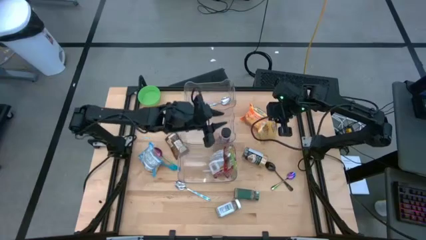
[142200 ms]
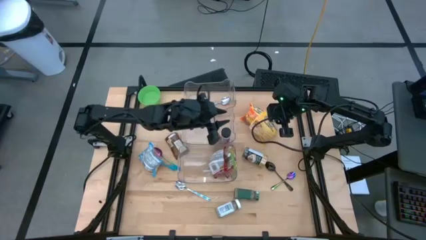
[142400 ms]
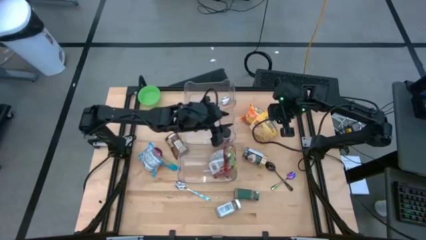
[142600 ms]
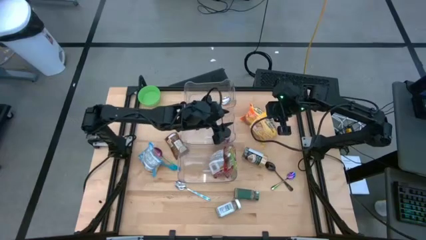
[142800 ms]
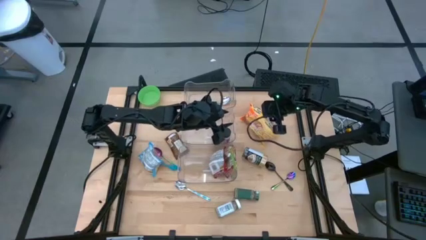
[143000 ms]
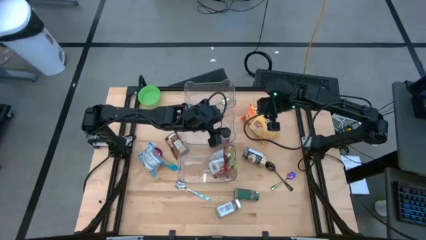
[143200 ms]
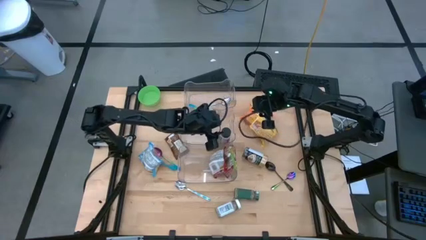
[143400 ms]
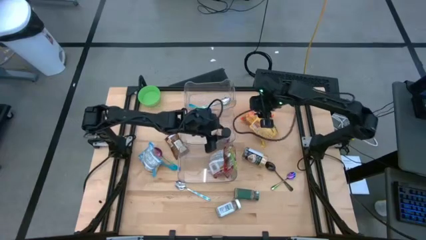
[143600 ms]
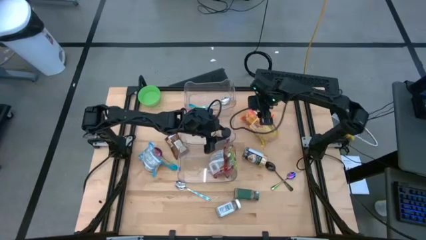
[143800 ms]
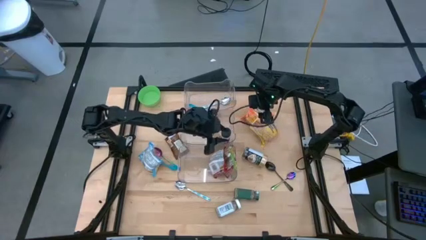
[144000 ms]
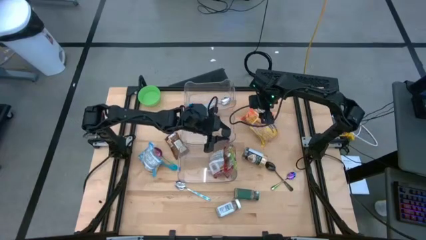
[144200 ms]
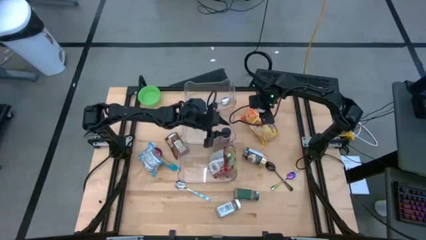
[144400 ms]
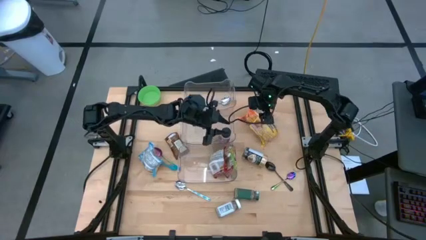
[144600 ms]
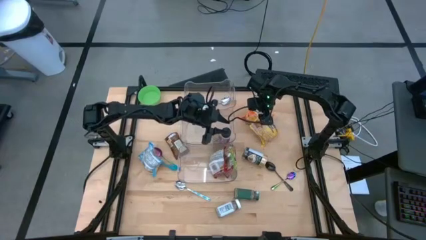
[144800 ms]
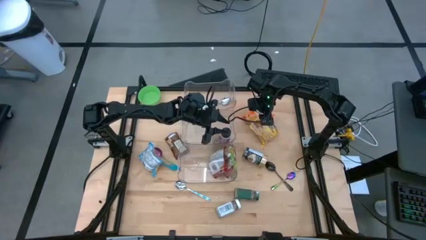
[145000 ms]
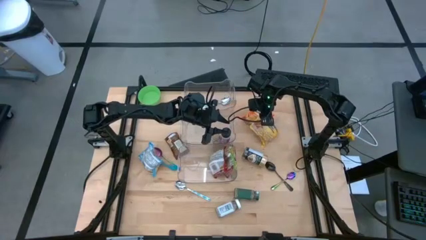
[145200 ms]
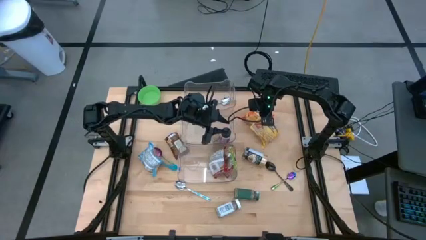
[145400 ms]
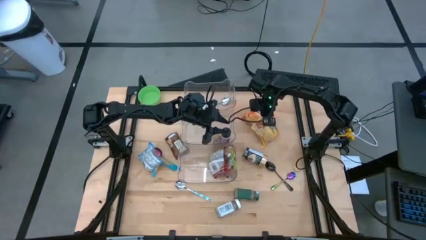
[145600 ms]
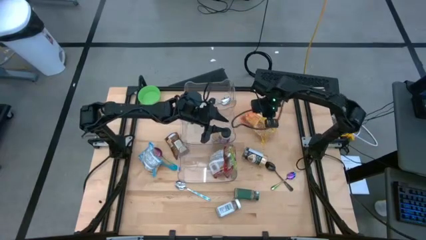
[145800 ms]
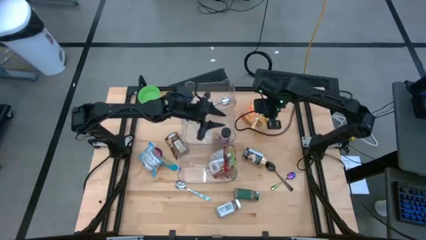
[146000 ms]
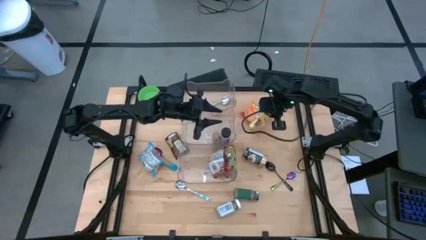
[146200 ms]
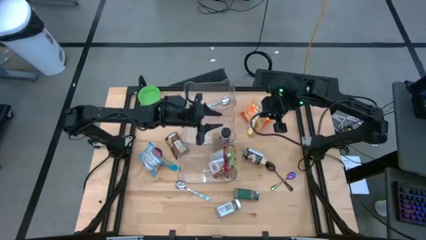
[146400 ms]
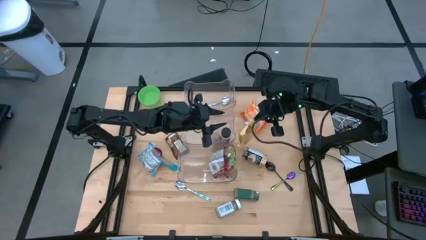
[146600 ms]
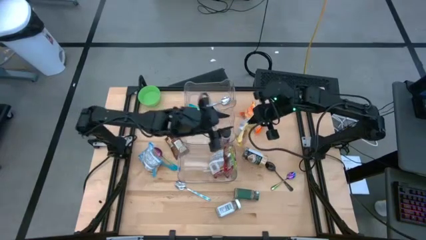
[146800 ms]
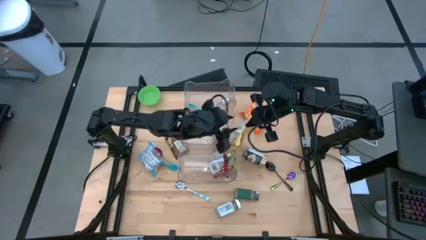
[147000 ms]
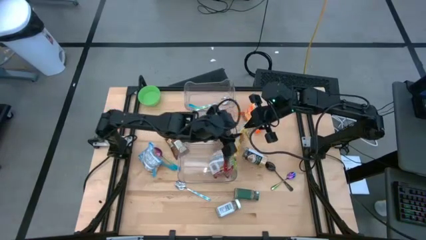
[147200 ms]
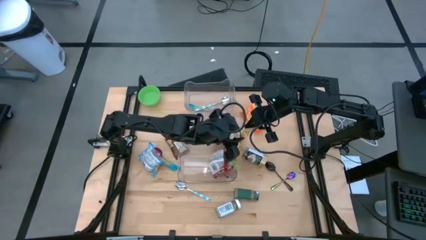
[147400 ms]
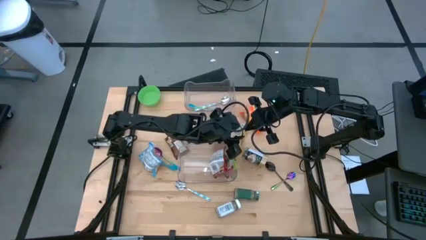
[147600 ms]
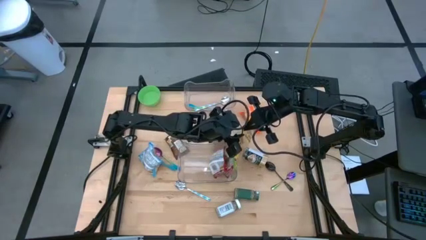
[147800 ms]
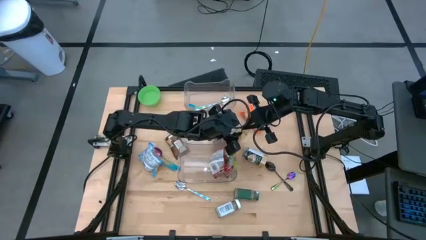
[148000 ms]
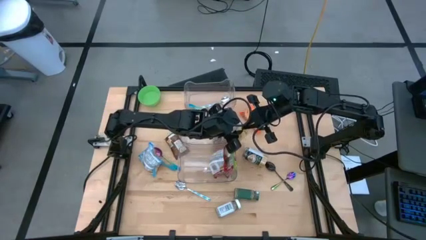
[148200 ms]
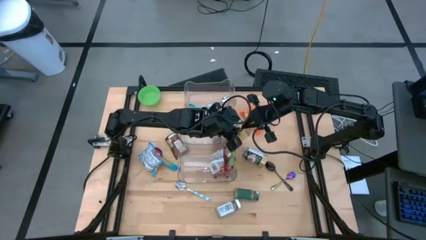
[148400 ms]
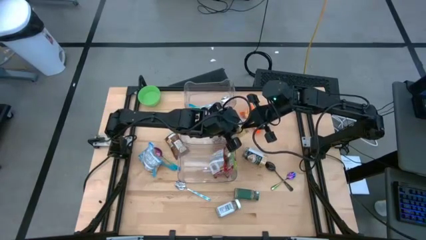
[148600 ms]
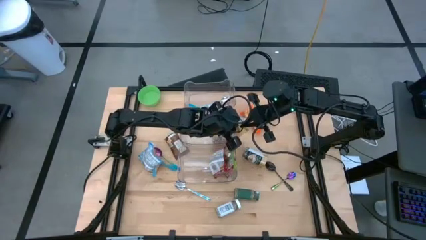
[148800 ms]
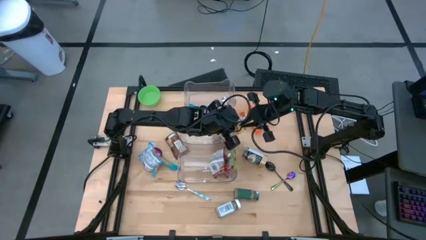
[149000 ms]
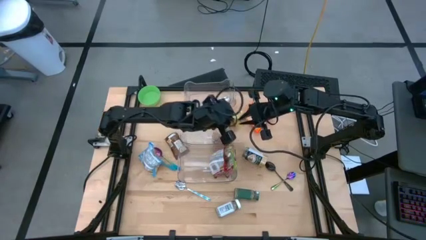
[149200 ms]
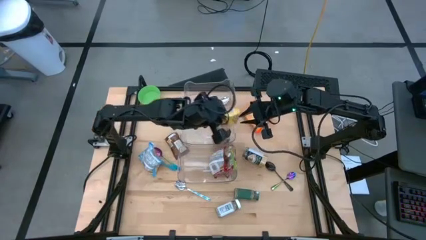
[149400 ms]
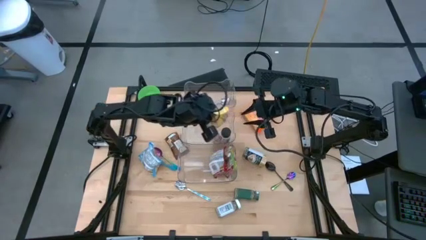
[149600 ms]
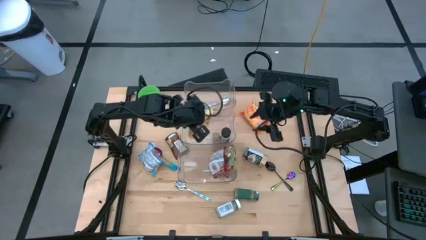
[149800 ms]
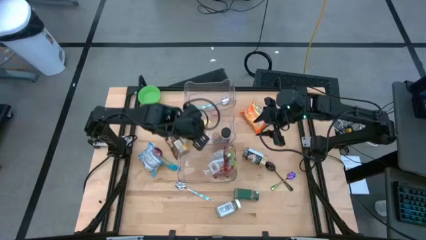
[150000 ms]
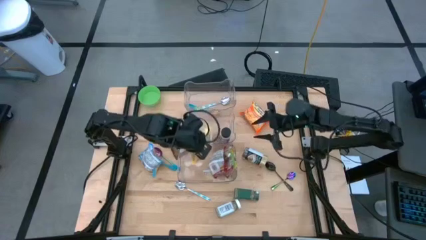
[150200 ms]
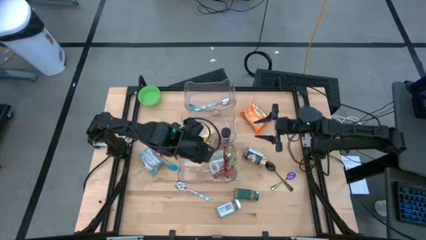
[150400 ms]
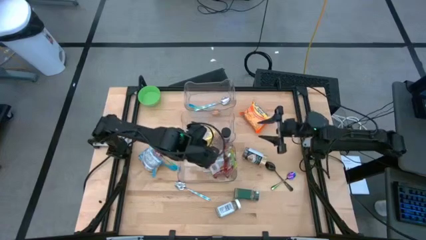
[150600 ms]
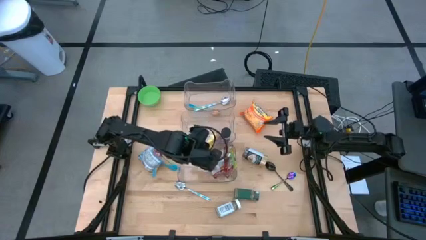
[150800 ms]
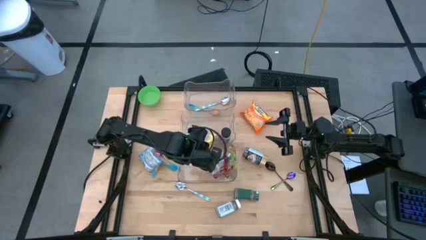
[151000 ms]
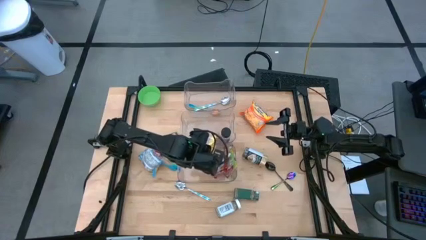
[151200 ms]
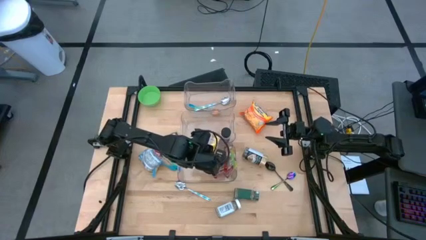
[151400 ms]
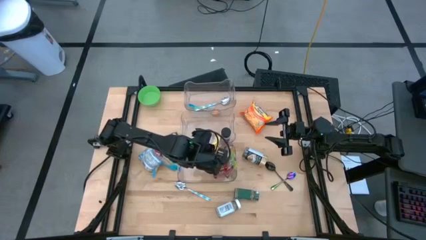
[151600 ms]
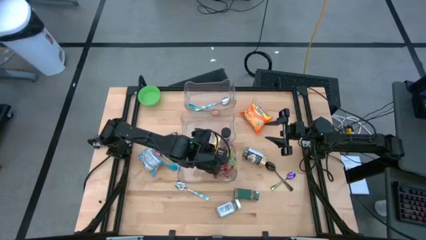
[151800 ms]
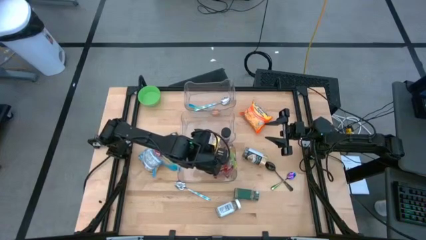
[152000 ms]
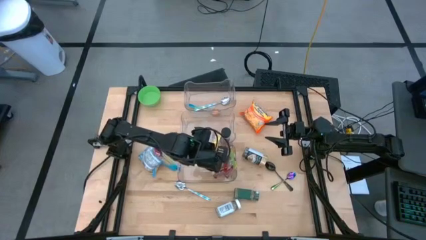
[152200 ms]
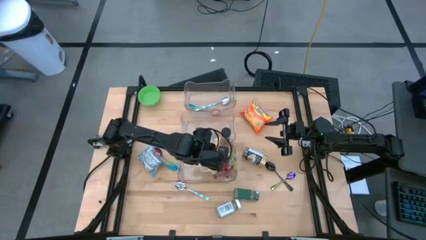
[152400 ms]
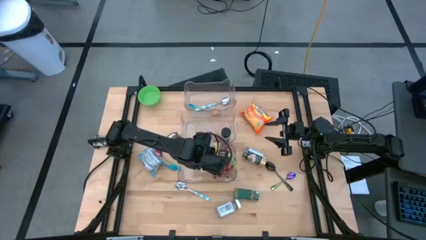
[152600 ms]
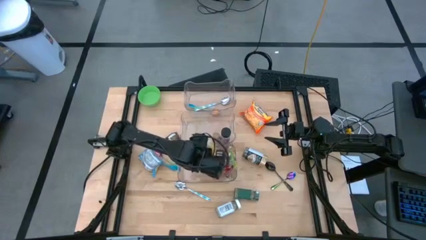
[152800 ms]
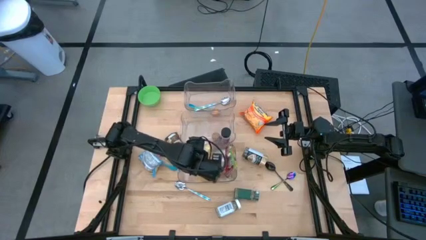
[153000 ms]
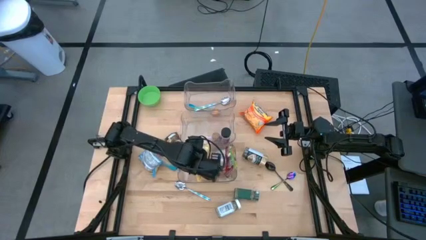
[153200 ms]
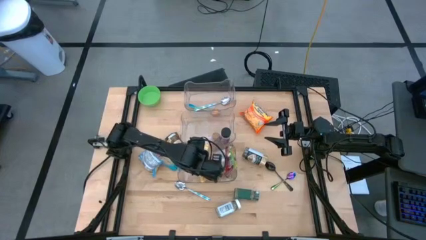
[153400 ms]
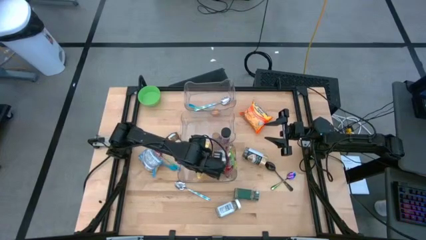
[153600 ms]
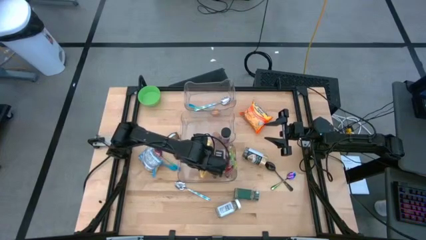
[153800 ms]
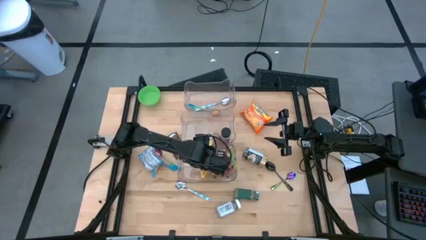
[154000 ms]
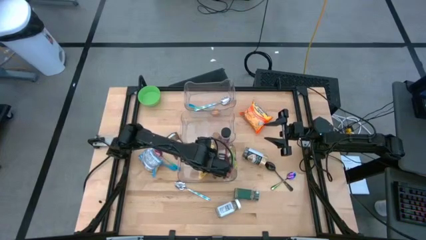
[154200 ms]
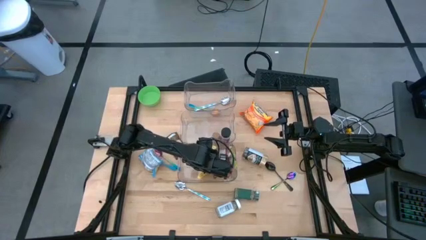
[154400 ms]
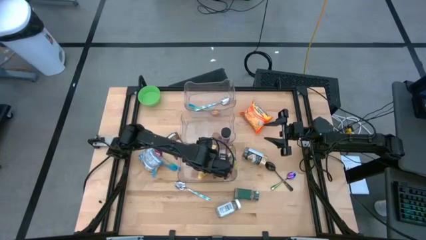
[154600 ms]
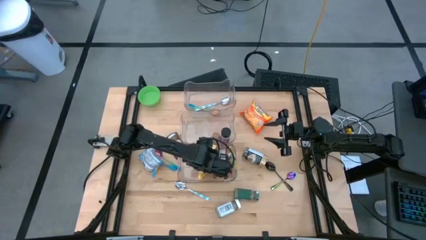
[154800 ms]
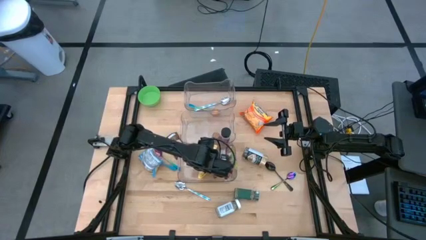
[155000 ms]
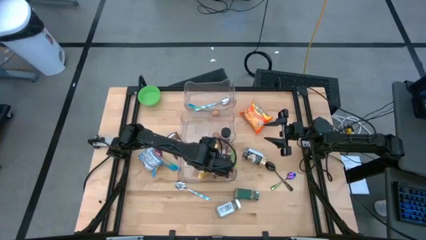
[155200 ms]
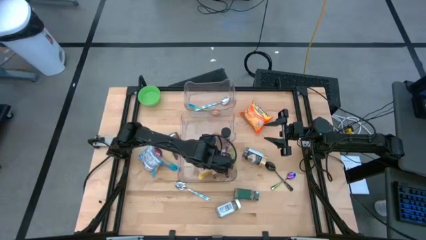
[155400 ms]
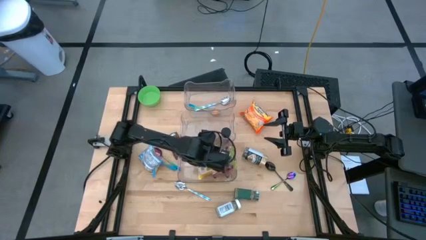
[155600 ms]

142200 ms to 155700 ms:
Task: Pick & Place Food Item
Put the yellow noodle pack into the bottom transparent bin

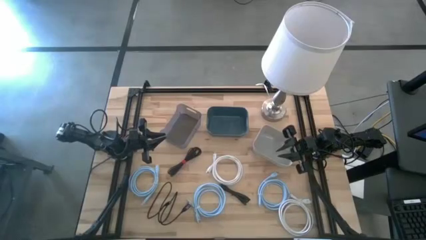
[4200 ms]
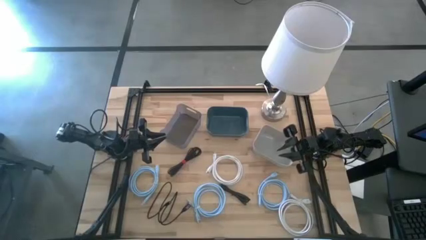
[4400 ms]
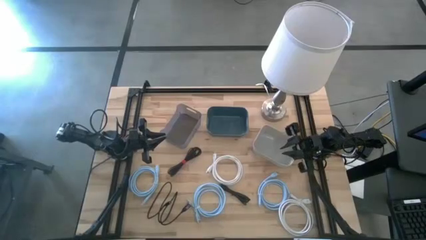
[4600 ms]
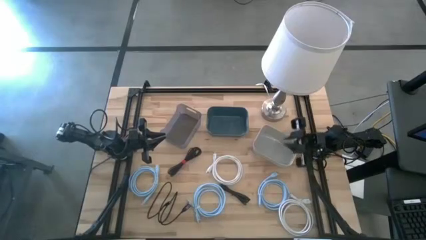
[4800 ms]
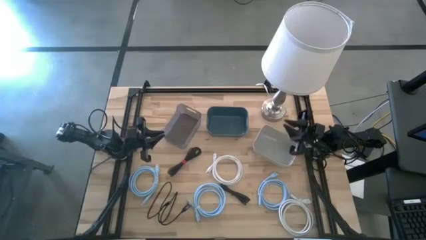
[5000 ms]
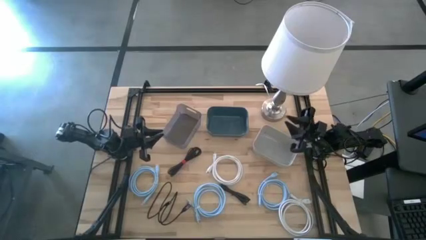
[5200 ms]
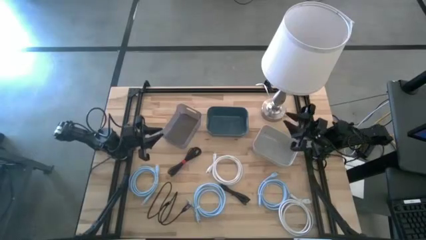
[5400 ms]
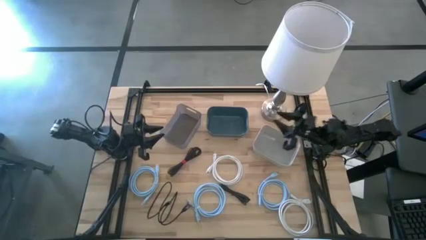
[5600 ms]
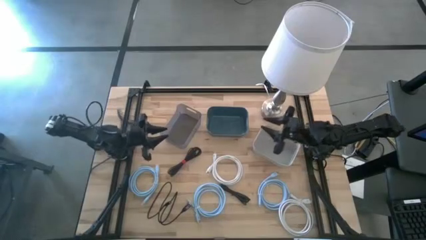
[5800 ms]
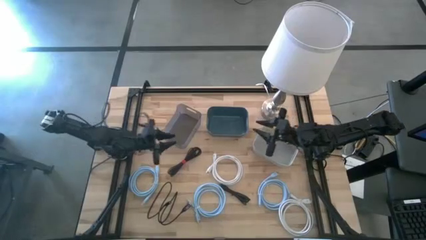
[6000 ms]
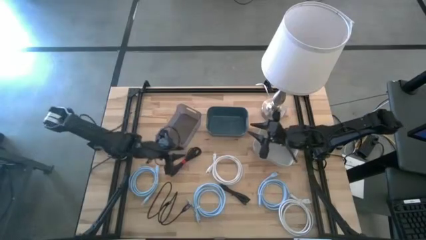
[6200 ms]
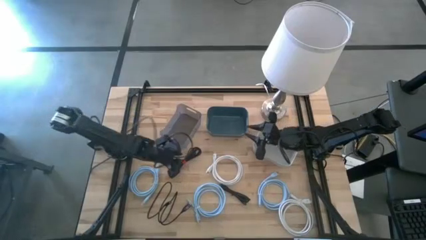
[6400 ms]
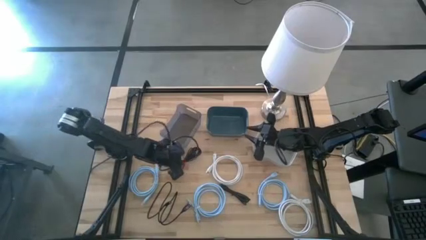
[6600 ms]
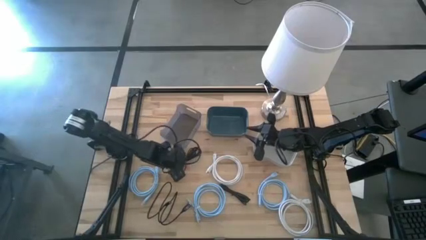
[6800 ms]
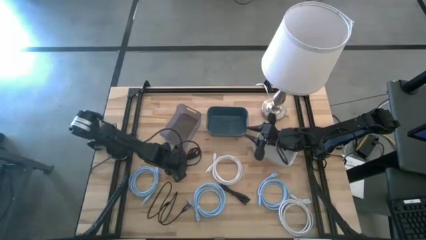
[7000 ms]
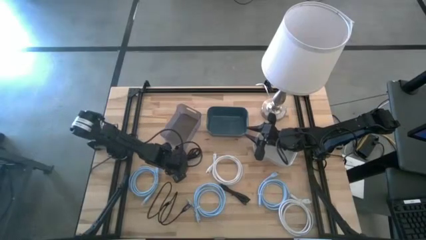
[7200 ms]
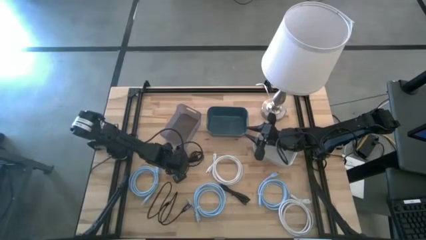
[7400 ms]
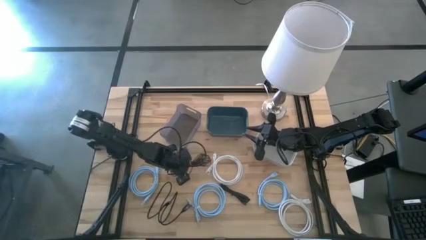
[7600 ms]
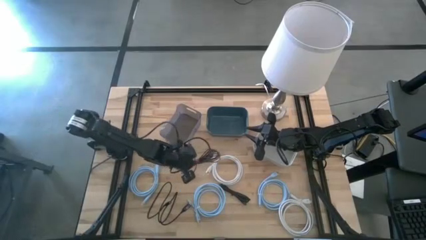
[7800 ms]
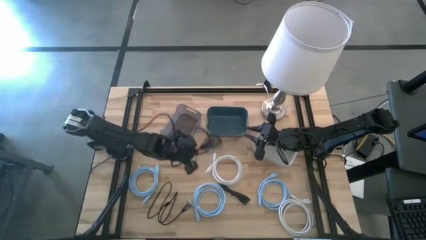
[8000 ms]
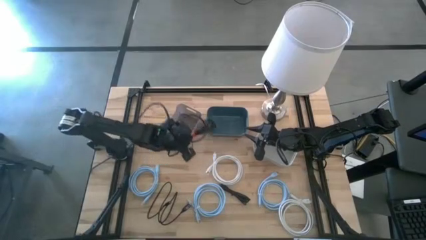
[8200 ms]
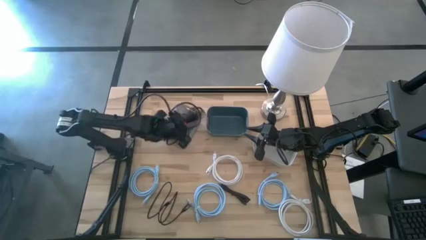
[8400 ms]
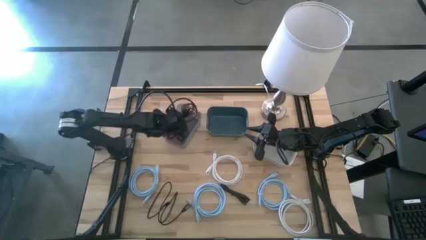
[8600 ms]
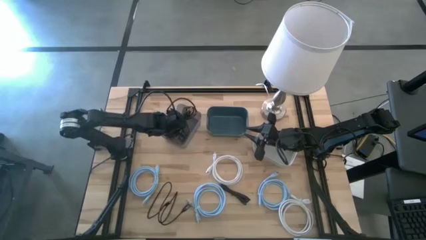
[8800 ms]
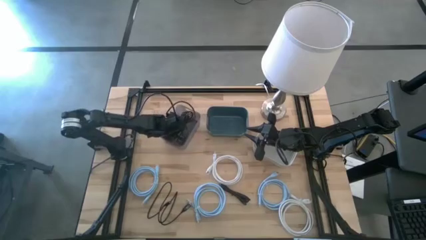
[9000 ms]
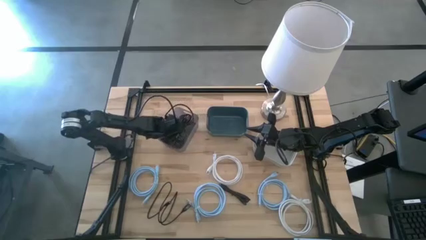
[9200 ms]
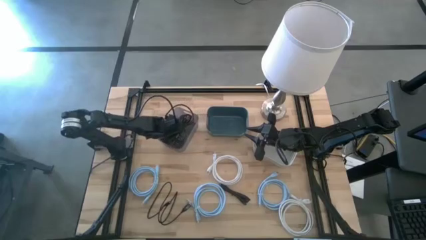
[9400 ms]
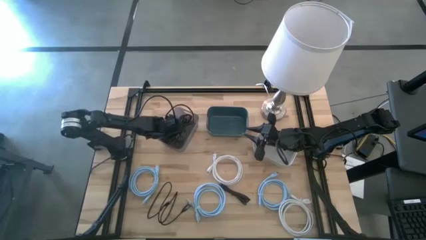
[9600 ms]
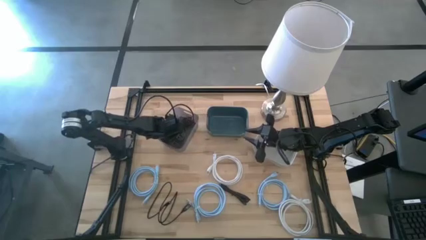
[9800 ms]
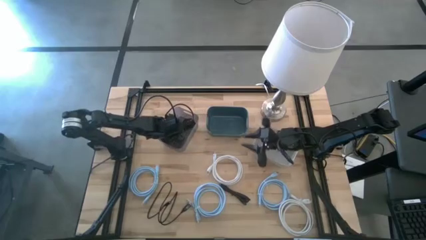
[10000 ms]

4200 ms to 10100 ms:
Task: Sort HDMI cables
Put the top black HDMI cable into the black bin
